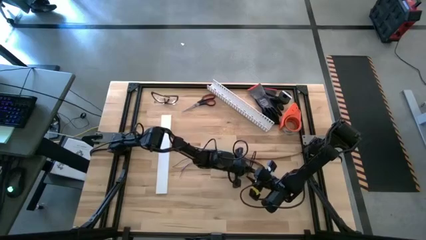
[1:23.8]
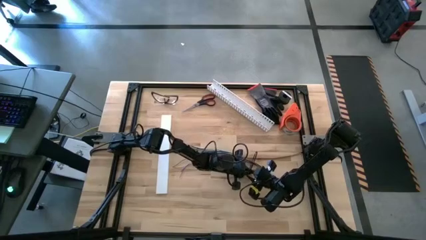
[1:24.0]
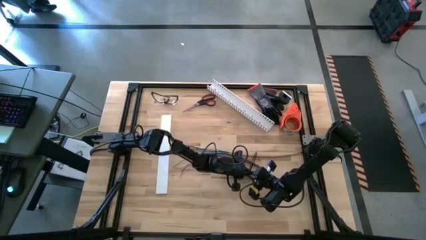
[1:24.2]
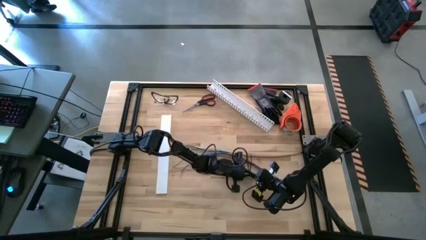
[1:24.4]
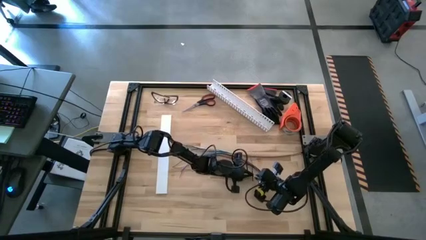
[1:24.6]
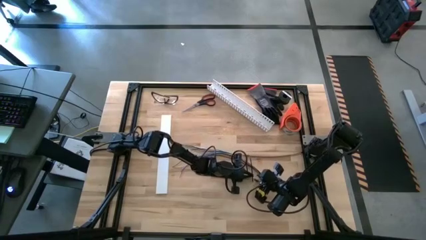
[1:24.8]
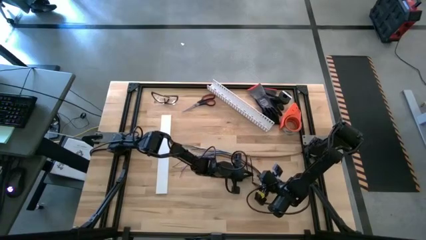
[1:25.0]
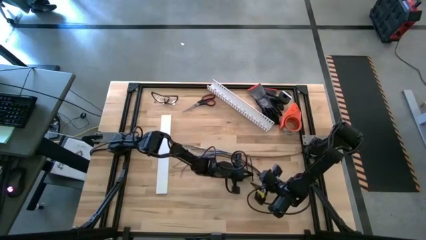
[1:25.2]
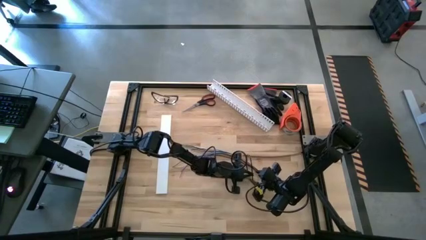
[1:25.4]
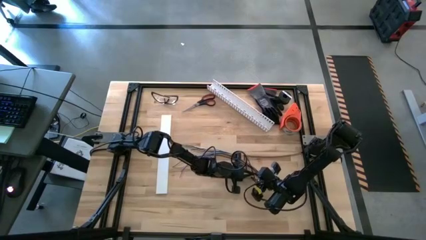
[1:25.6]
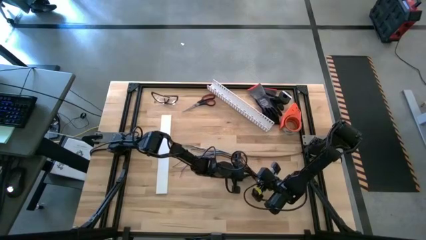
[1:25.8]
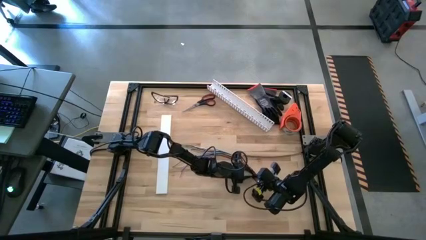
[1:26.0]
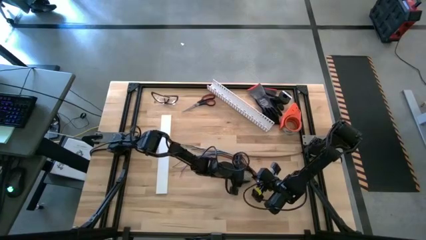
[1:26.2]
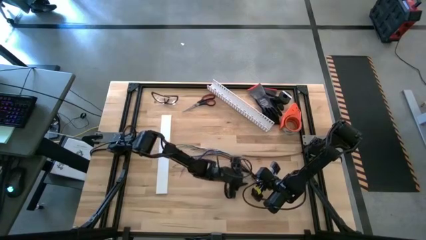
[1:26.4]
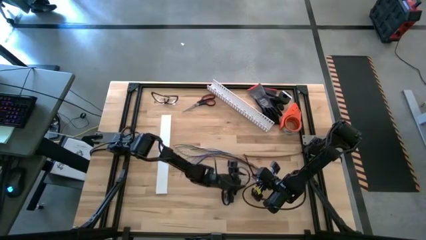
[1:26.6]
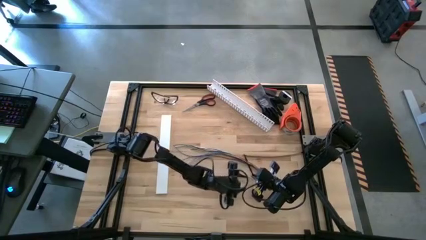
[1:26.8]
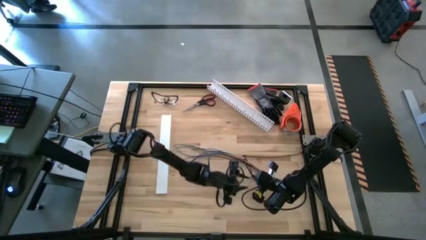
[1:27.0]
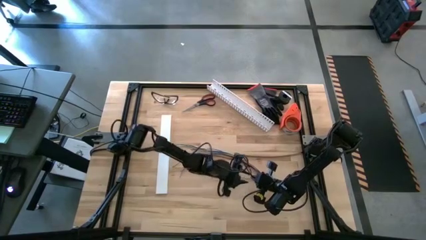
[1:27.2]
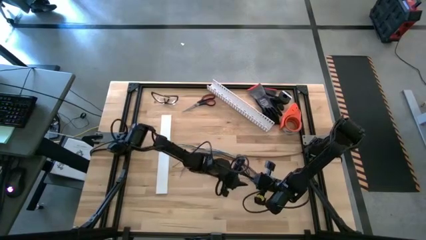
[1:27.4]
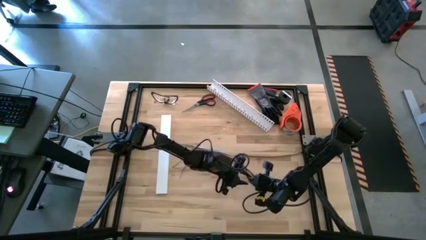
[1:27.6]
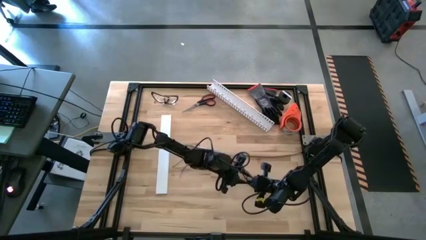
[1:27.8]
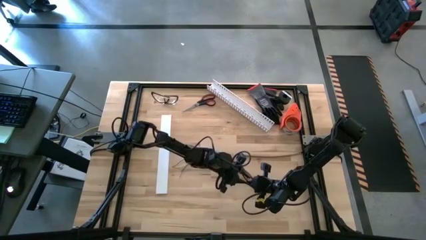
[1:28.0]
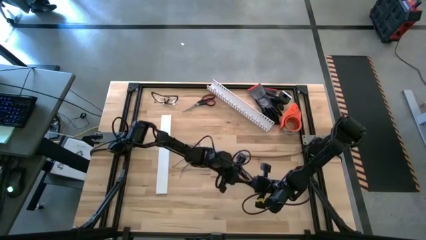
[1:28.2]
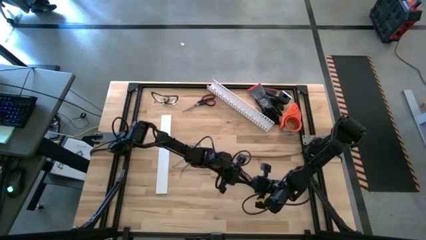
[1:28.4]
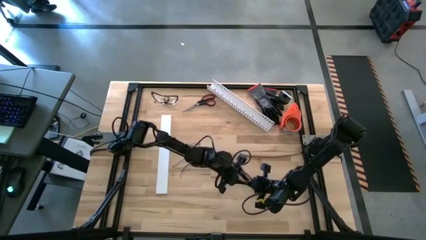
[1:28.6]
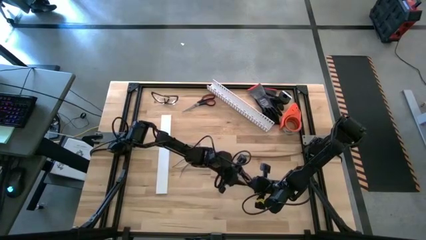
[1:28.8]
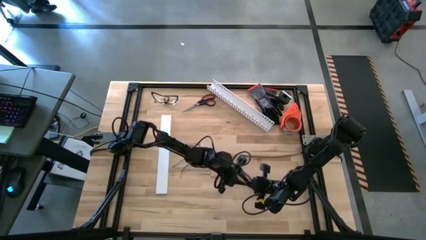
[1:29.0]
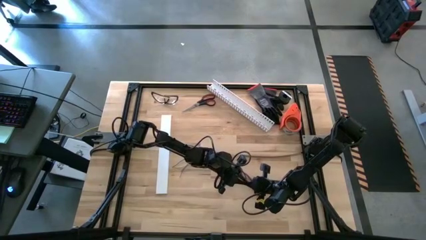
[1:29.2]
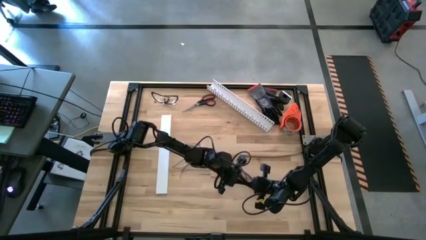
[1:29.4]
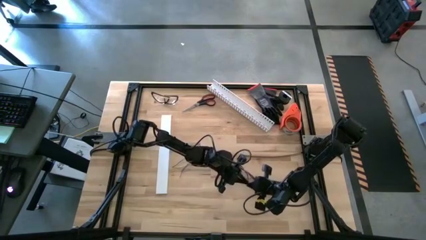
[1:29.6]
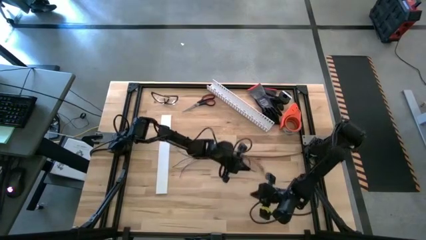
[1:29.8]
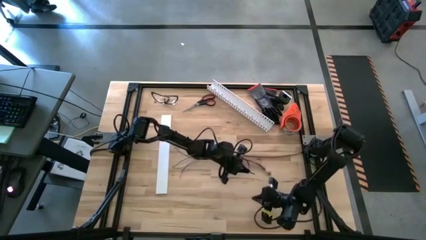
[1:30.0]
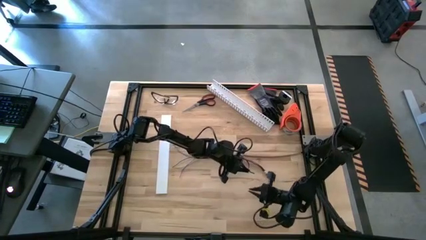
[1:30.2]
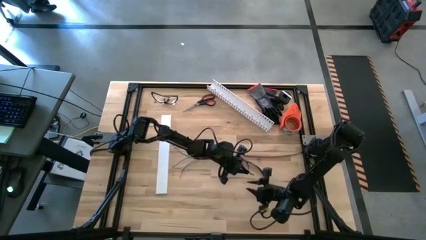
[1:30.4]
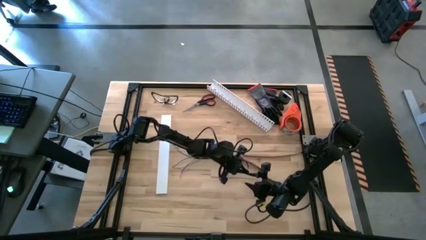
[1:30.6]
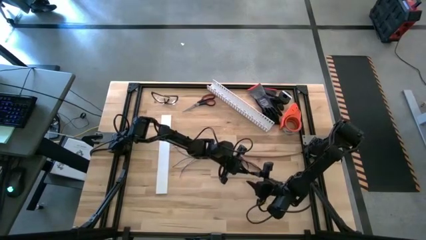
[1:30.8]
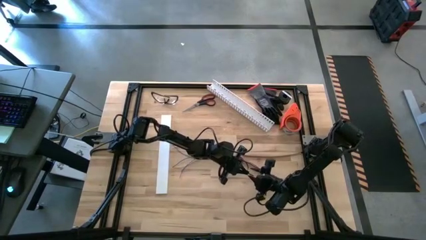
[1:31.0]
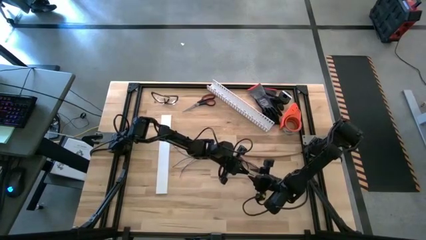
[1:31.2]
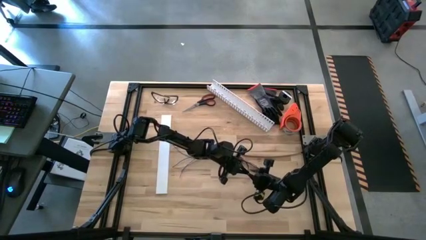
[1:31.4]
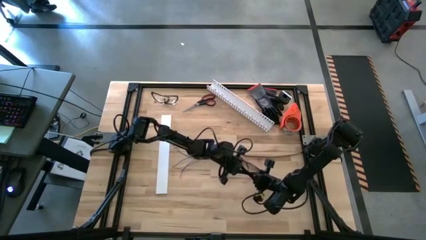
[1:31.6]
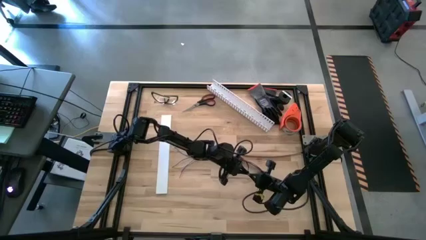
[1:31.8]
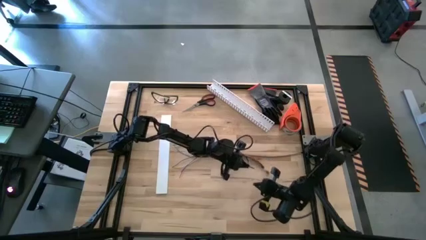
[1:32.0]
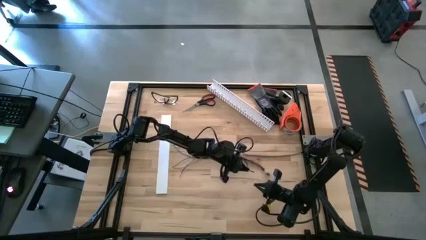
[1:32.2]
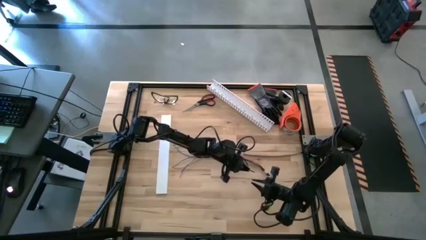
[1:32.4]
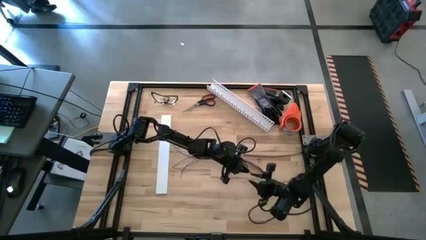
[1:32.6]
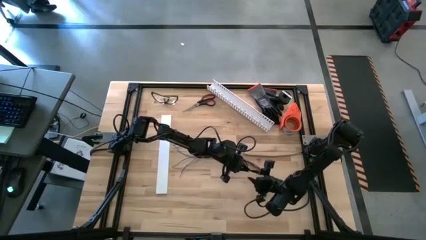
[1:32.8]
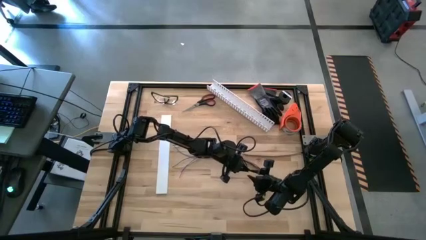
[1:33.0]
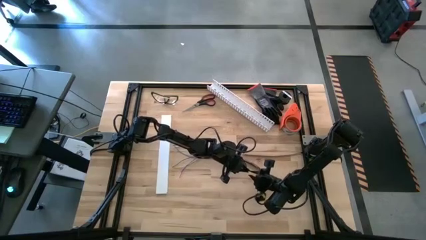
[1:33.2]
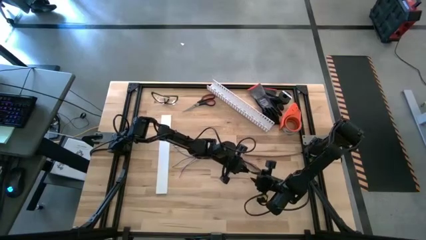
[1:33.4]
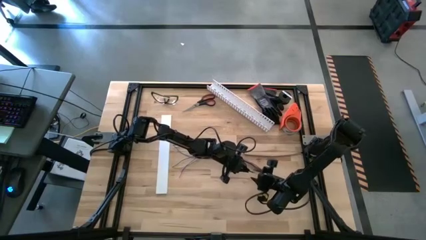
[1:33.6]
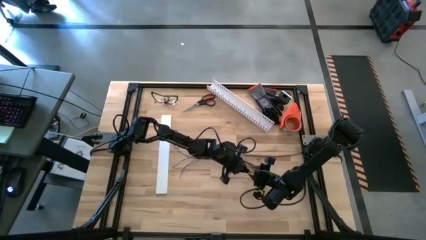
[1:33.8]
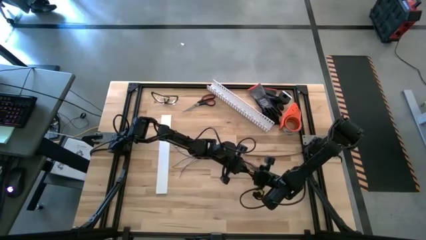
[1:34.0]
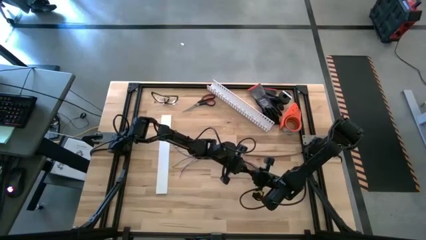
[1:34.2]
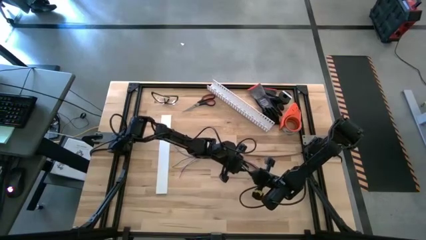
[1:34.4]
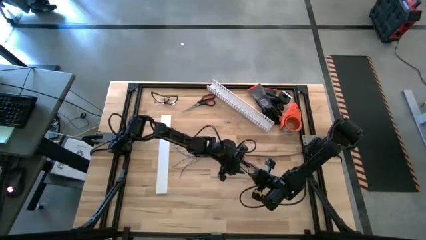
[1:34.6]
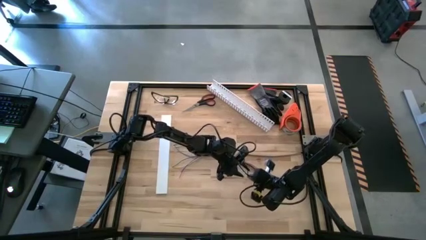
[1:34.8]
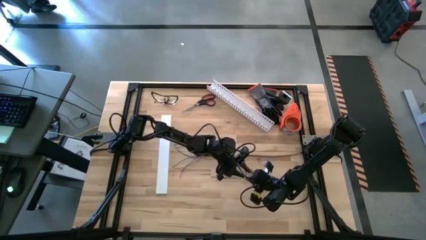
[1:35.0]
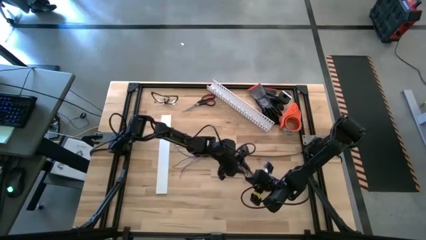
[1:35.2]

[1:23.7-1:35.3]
Task: Ziptie cables
Wrap the bottom black zip tie on the cable wires

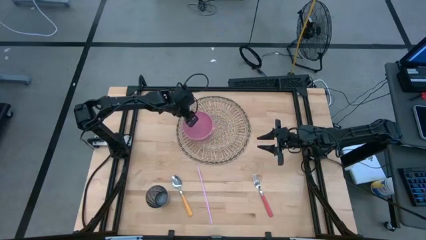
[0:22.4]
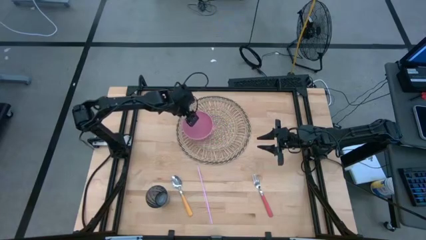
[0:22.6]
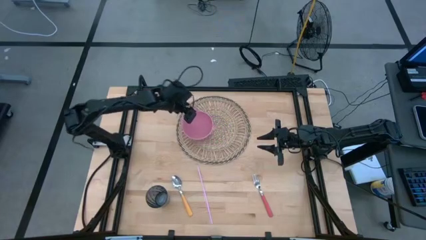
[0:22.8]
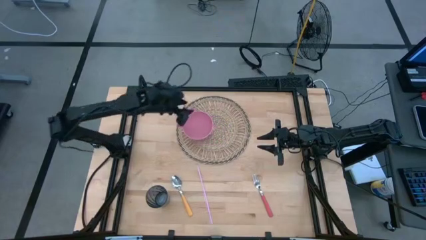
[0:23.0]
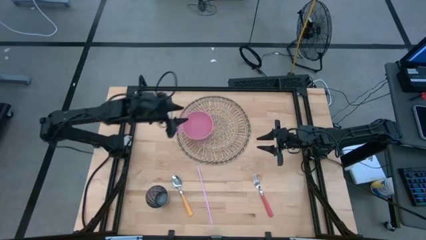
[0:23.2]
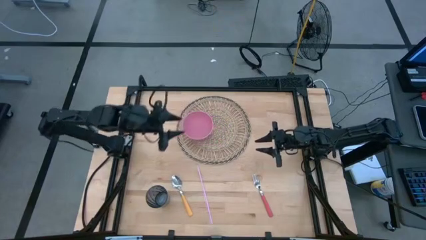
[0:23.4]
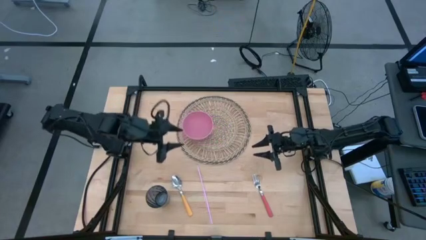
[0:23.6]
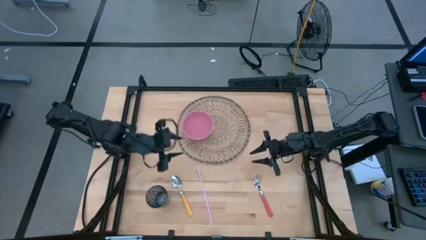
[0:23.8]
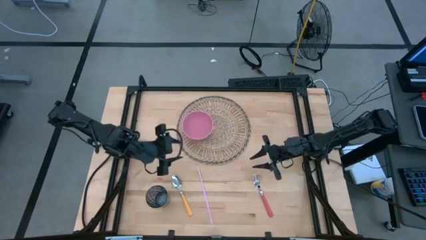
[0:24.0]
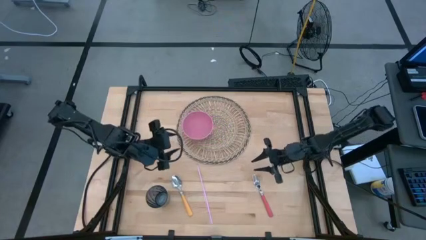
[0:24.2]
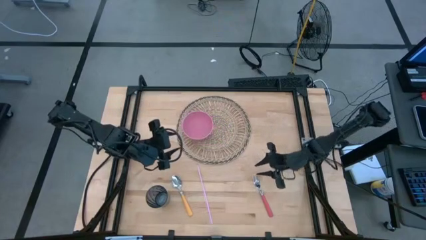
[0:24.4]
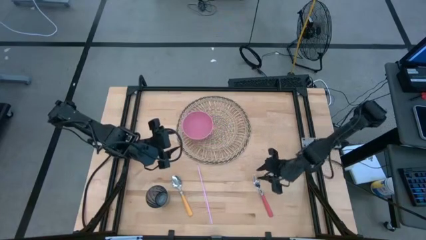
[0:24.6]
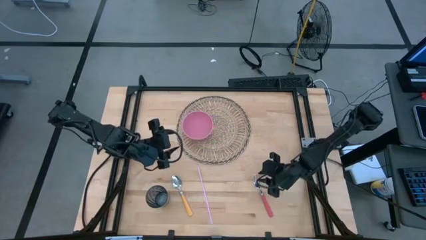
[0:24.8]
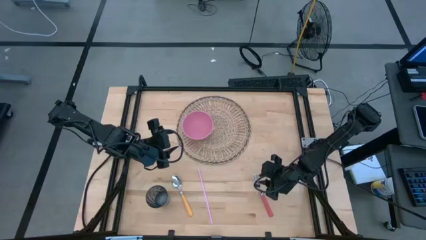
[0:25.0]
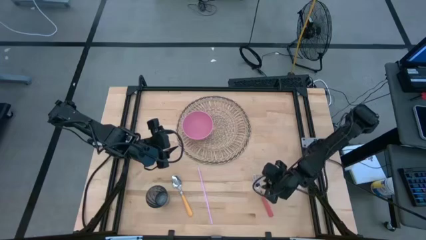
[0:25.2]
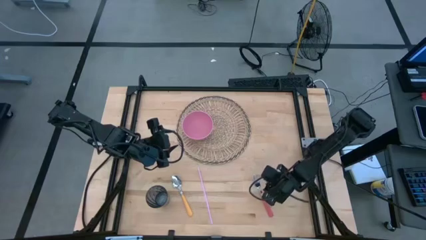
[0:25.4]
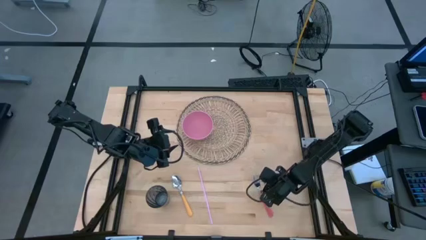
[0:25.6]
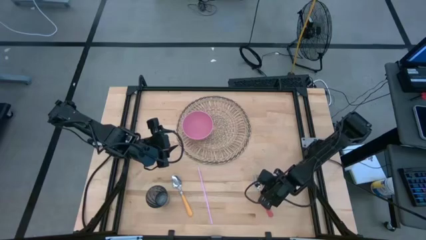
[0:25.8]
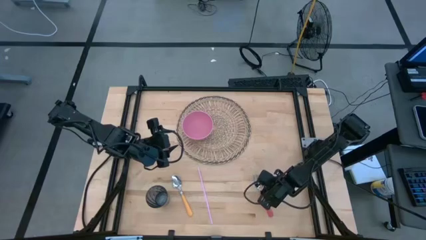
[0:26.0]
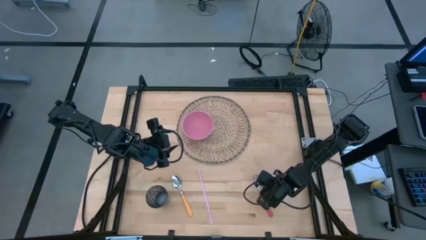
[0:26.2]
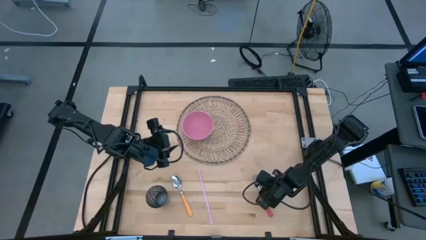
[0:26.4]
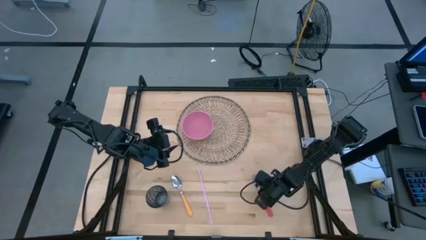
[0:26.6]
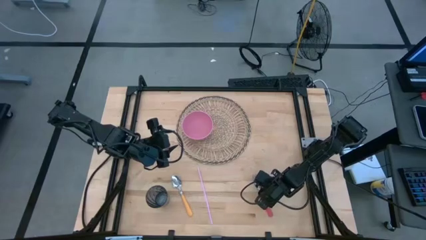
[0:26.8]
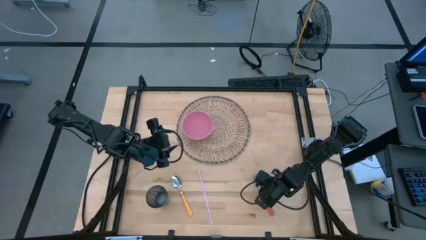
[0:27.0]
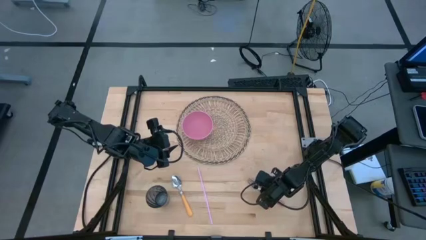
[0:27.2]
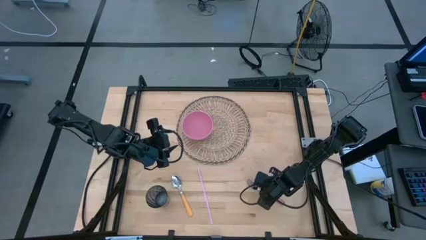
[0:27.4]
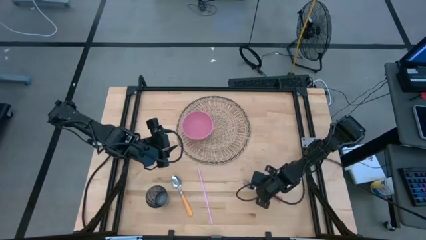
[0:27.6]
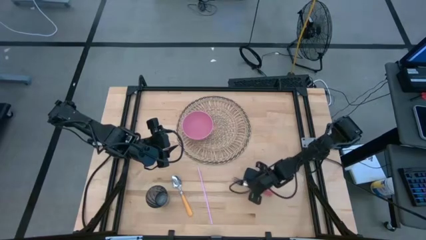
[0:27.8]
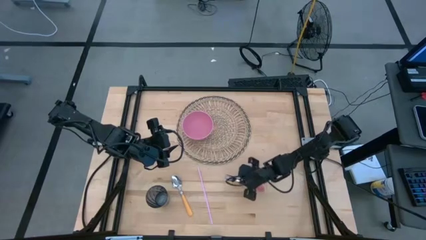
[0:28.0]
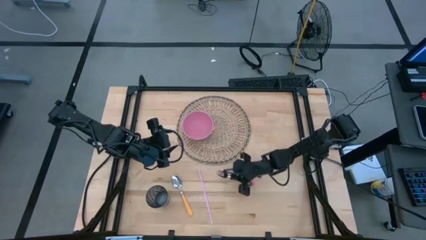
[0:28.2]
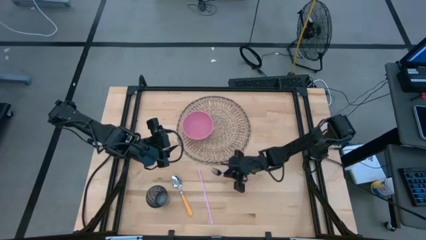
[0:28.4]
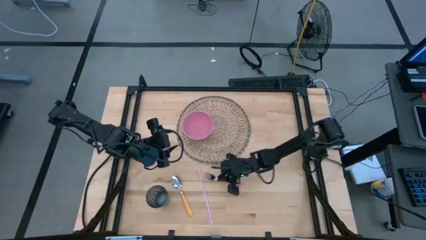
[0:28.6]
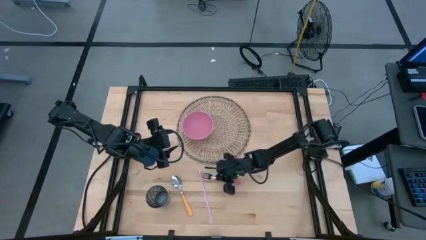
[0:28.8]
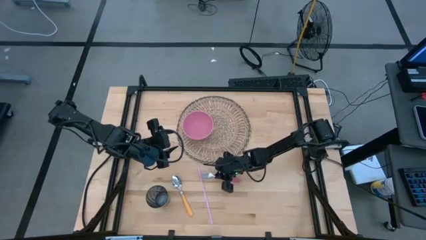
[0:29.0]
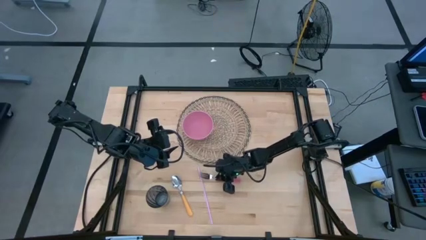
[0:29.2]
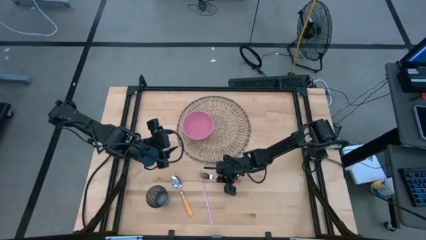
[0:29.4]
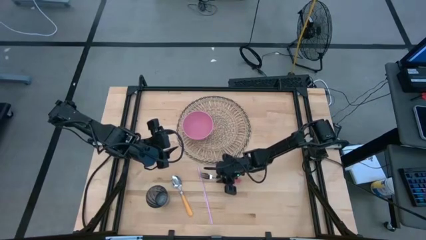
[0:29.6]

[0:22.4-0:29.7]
Task: Pick & Place Utensil
Put the pink fork on the pink bowl on the brown placemat
